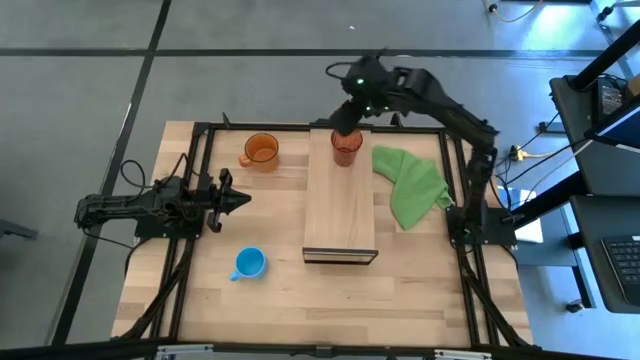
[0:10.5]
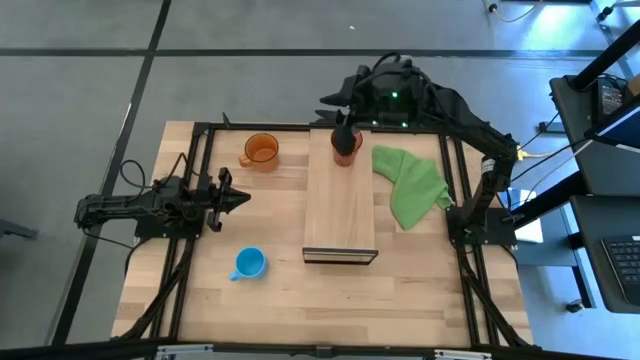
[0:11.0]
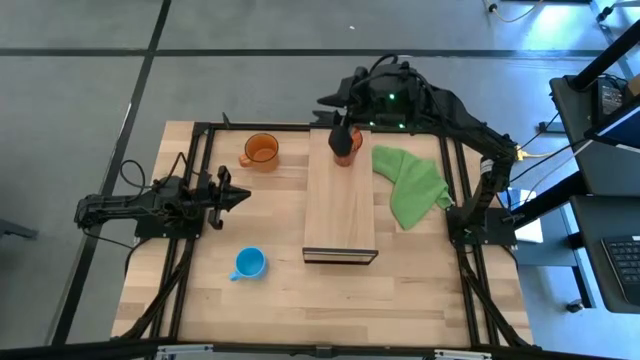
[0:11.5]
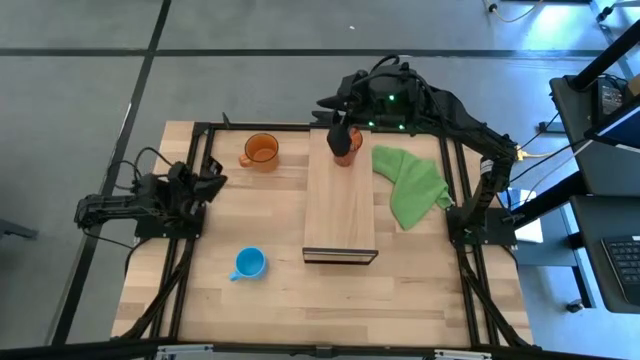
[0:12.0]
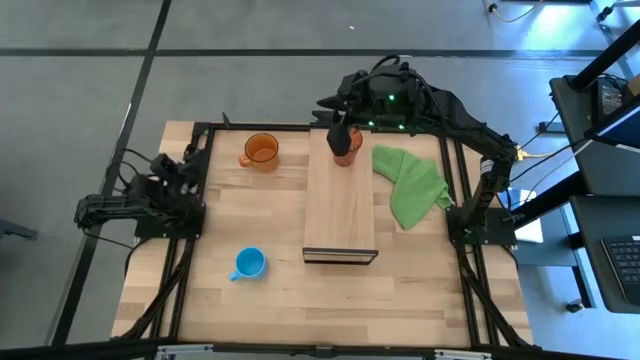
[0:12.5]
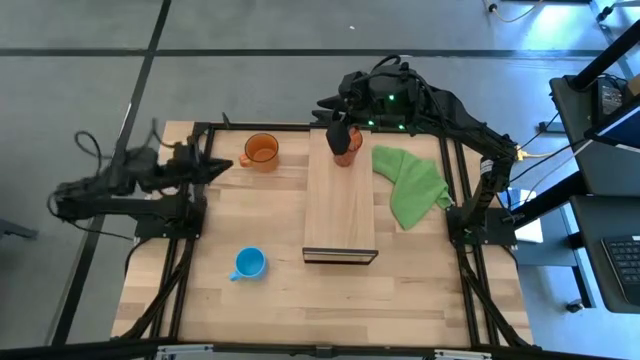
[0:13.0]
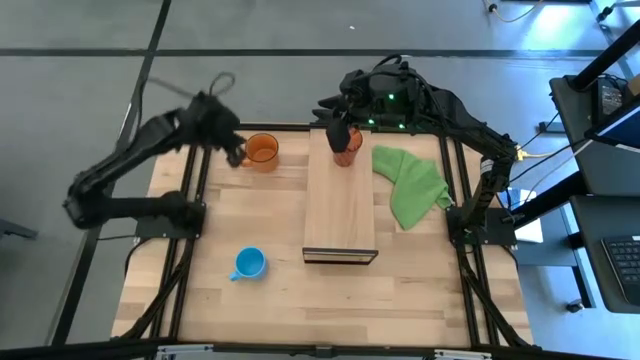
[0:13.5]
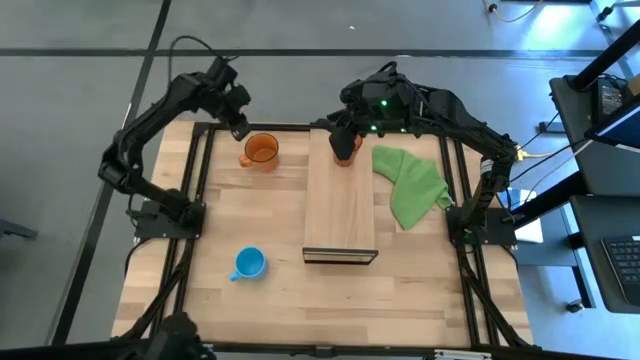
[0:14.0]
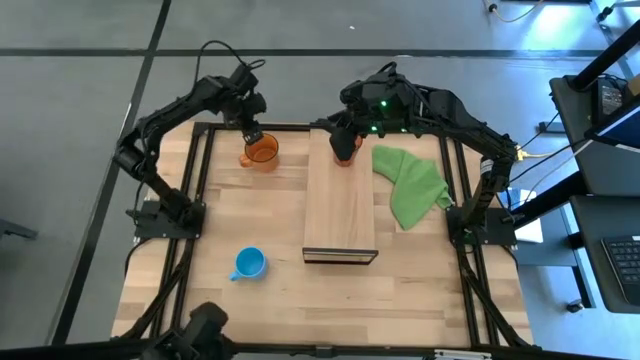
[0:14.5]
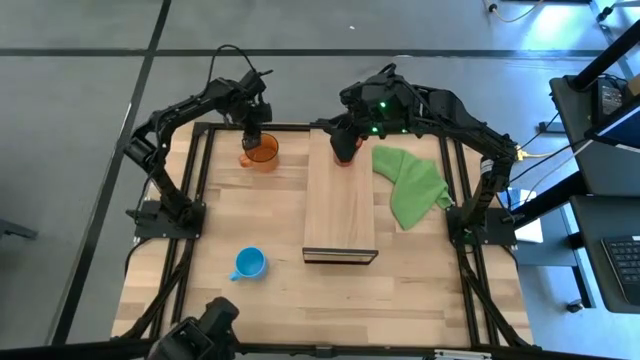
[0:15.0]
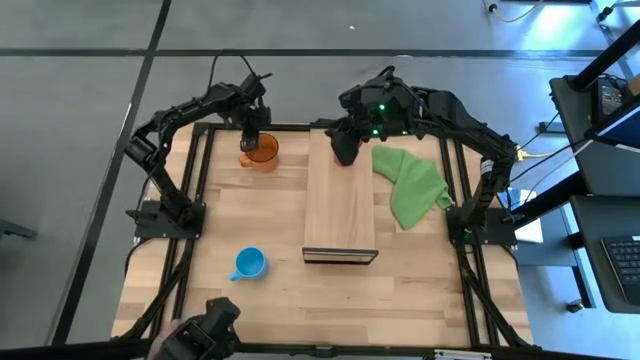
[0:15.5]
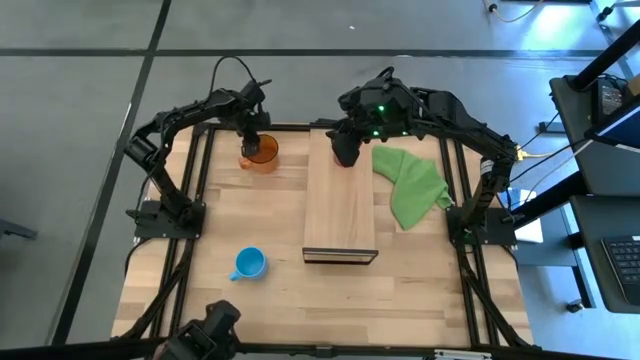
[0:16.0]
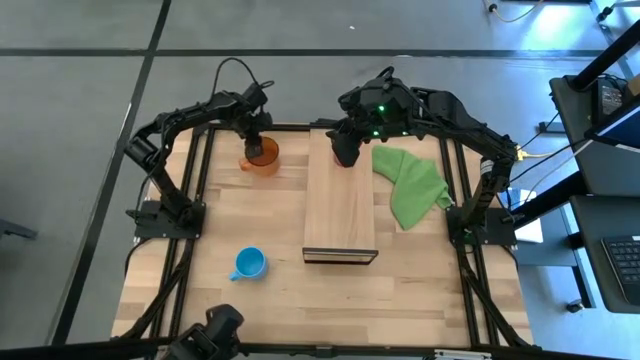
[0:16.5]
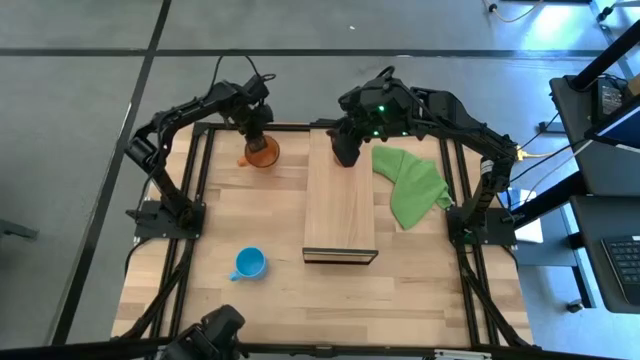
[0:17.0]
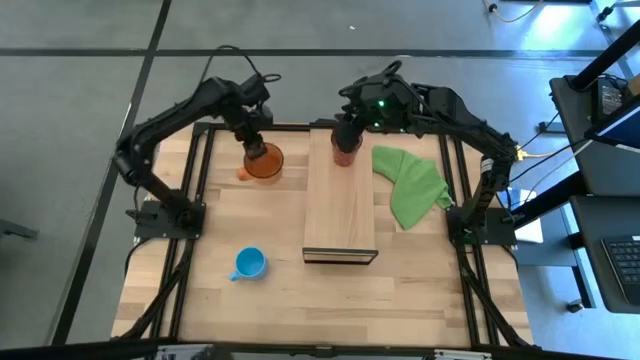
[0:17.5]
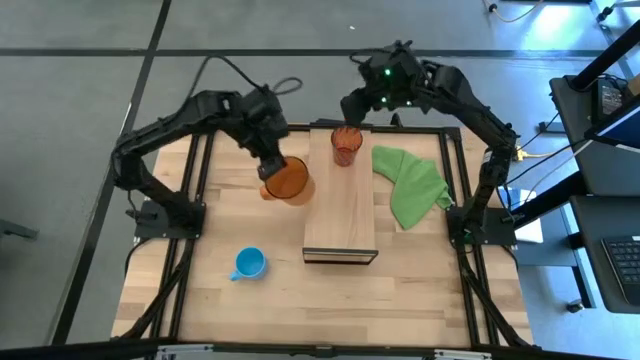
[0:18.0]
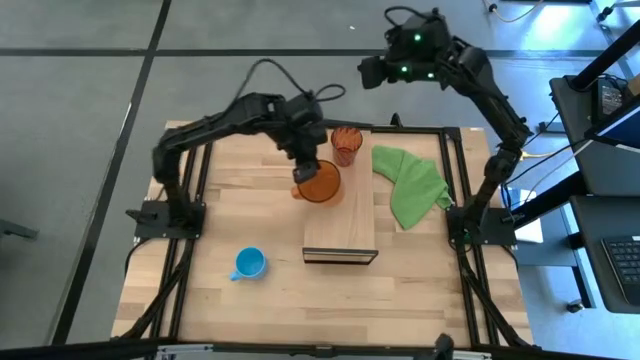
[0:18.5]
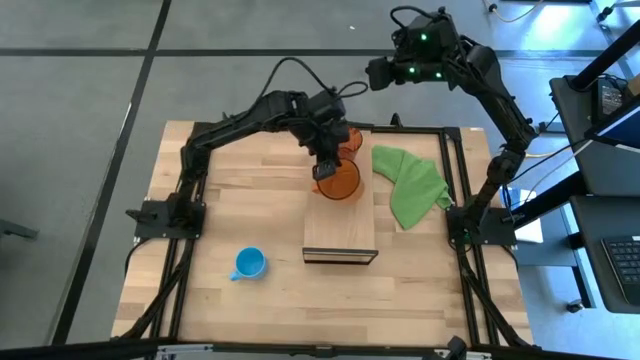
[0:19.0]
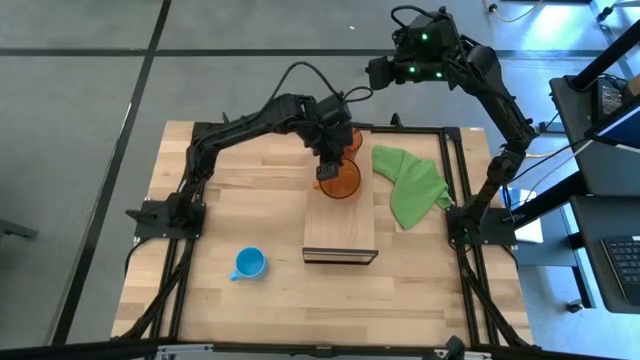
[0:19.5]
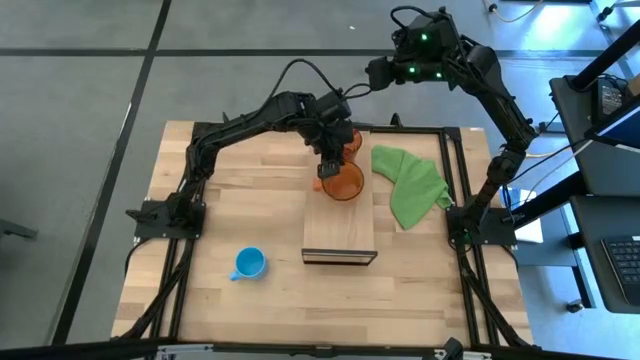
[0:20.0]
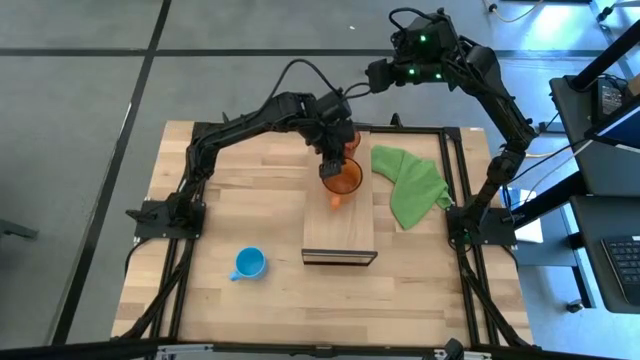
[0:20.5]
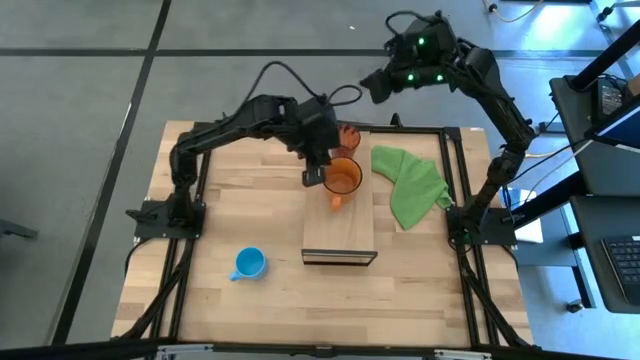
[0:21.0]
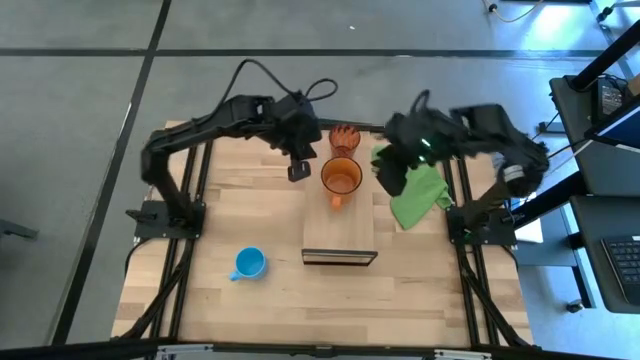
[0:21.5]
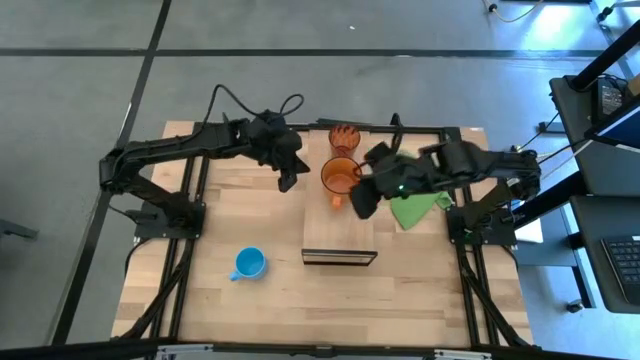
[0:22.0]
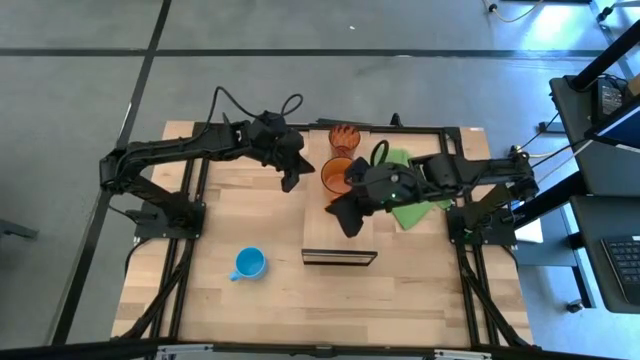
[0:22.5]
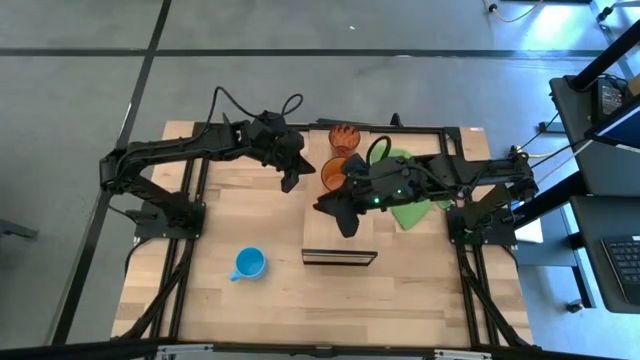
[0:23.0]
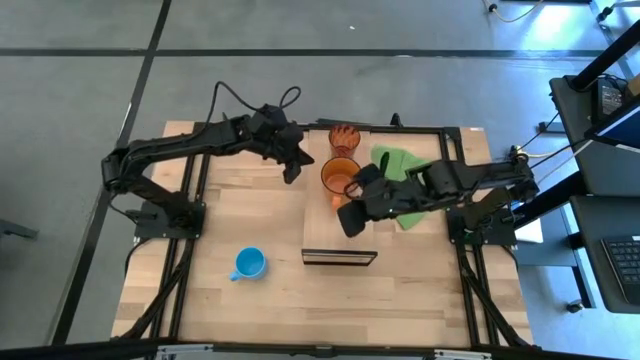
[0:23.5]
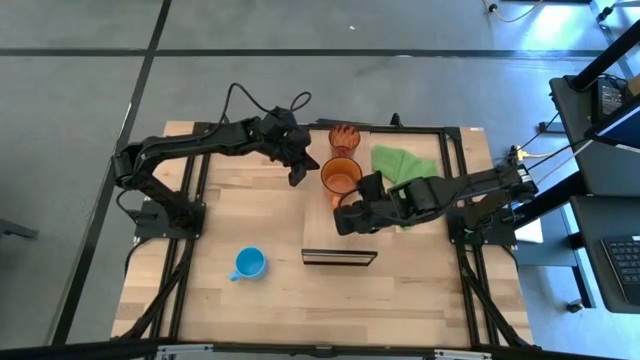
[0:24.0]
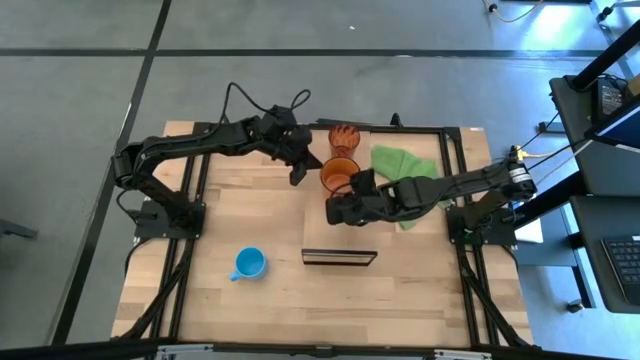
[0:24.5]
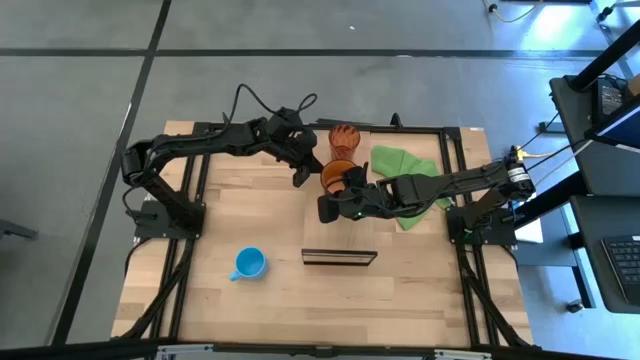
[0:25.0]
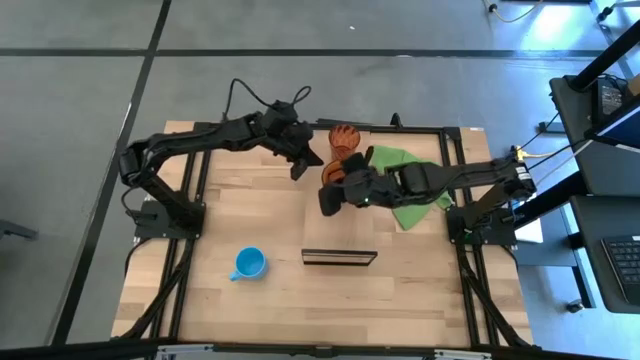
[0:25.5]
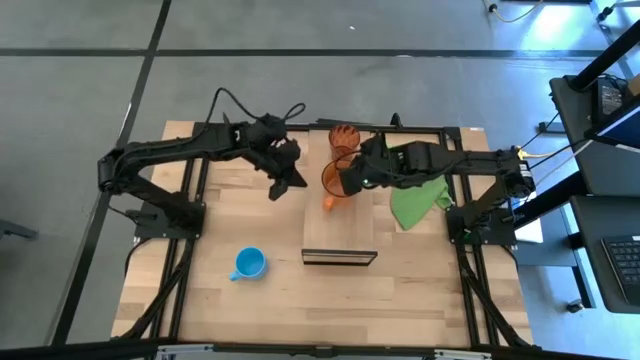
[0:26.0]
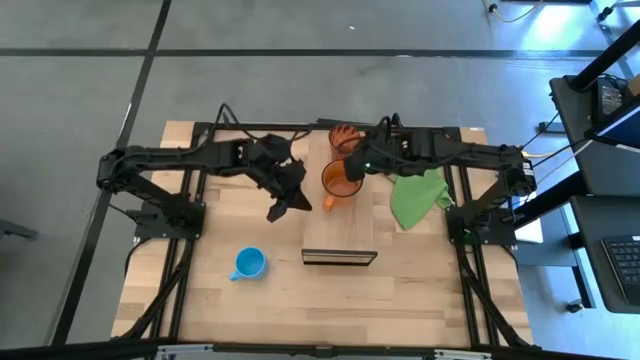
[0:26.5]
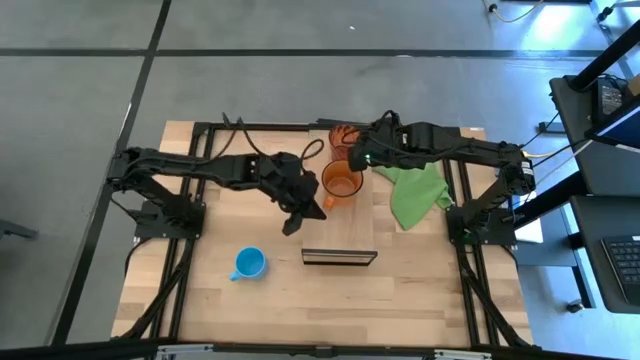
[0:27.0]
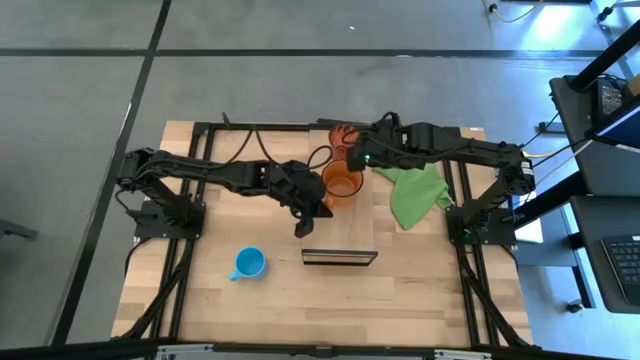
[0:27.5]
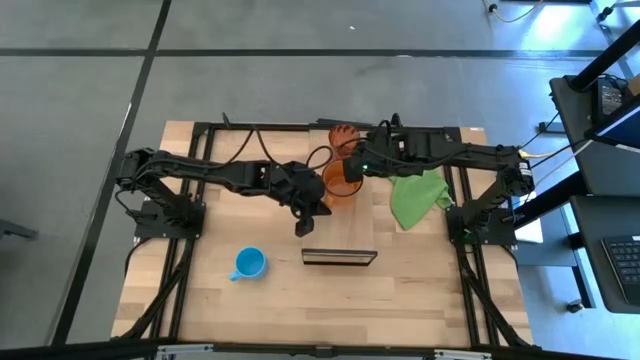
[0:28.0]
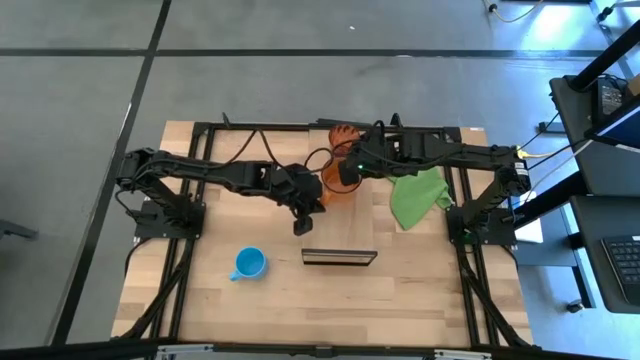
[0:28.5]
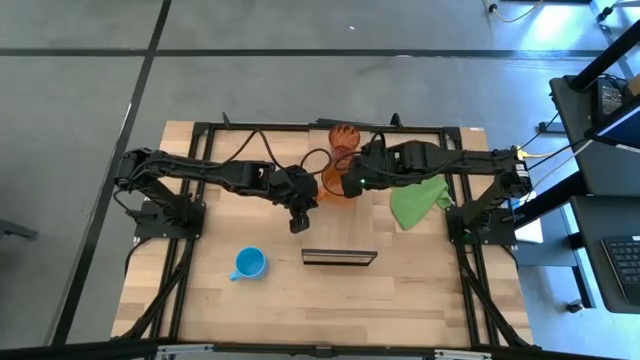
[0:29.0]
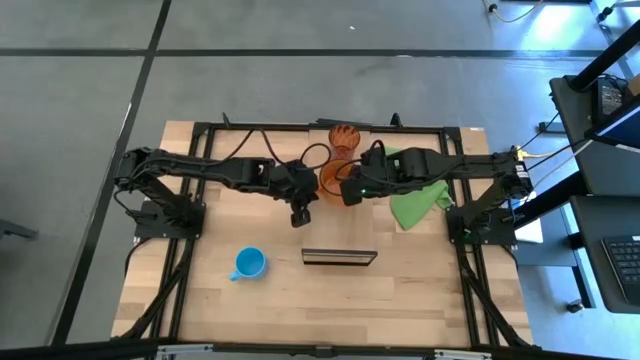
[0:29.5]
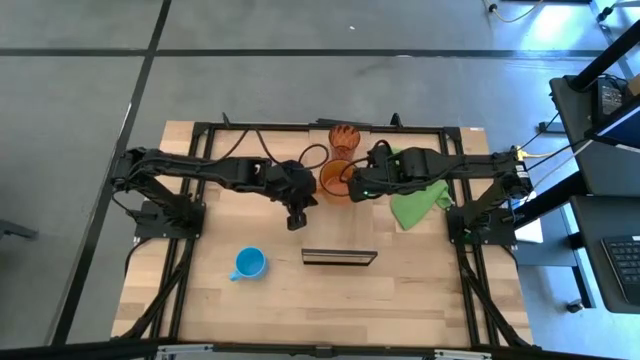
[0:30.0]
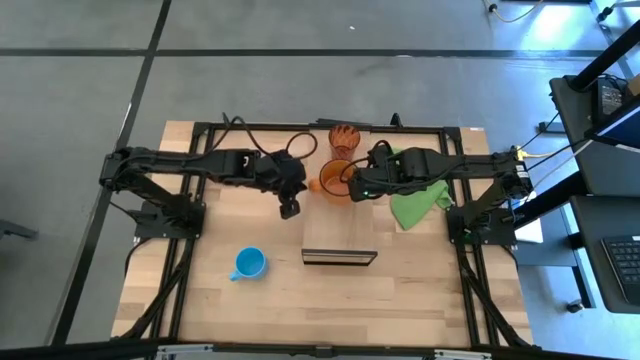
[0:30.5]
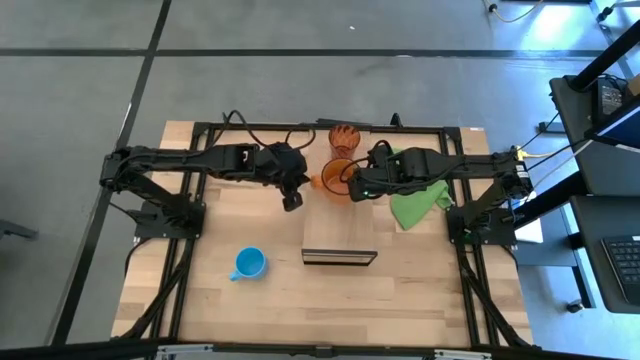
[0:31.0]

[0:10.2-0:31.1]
Task: Stack small to large cups/mugs on shelf
Put the orange mug on the shelf
